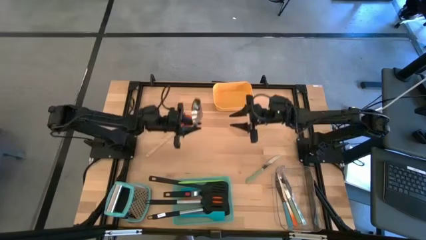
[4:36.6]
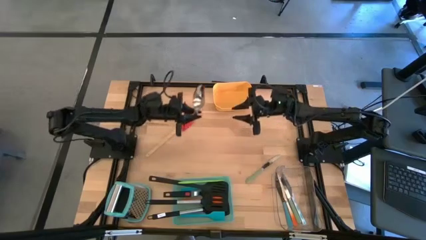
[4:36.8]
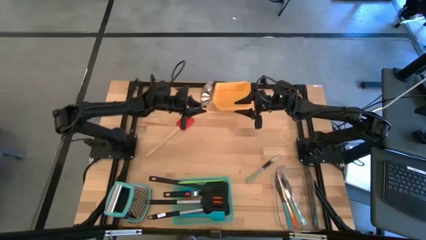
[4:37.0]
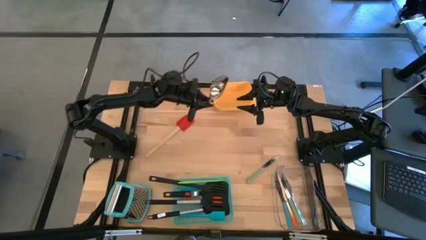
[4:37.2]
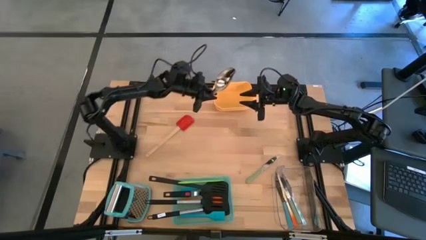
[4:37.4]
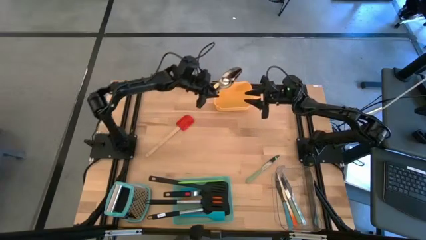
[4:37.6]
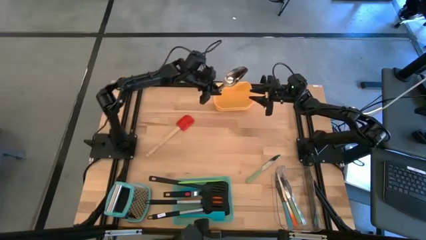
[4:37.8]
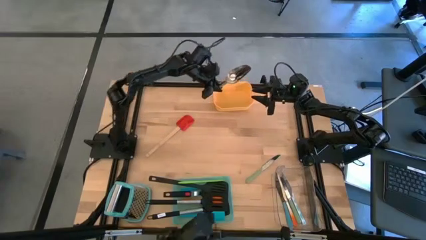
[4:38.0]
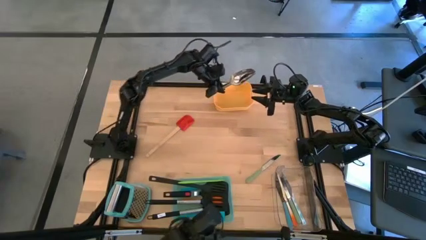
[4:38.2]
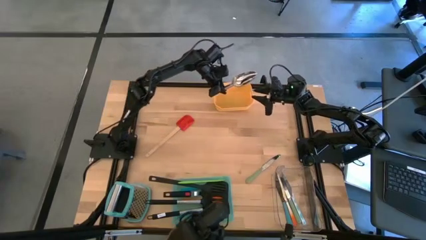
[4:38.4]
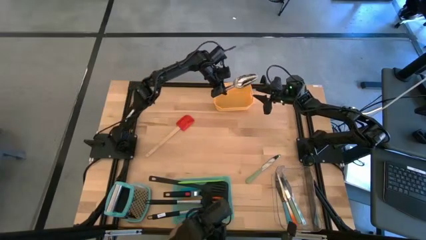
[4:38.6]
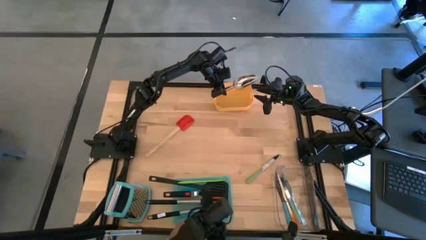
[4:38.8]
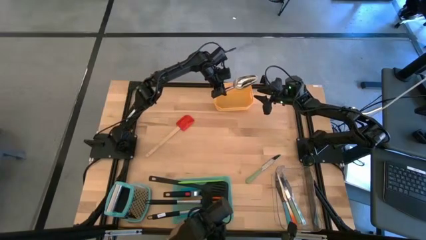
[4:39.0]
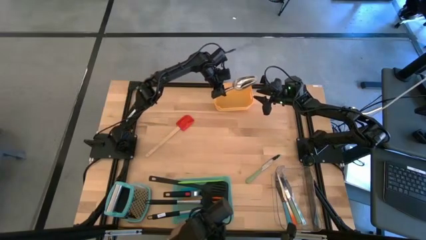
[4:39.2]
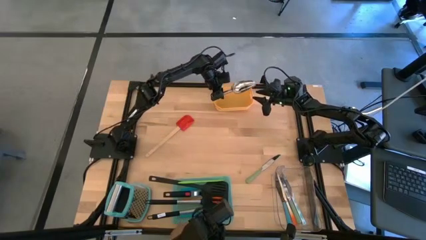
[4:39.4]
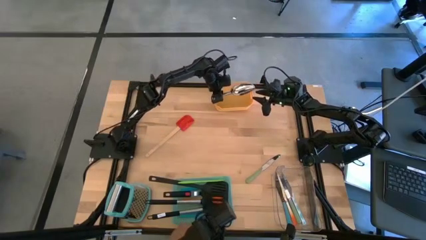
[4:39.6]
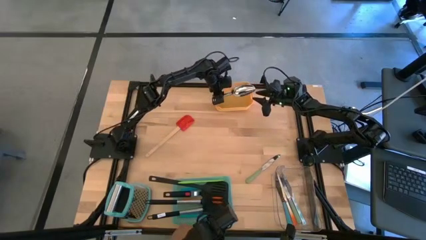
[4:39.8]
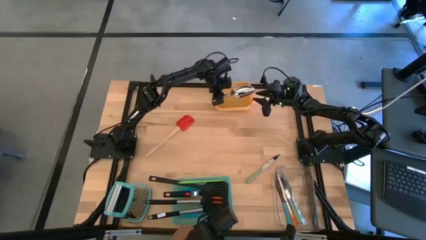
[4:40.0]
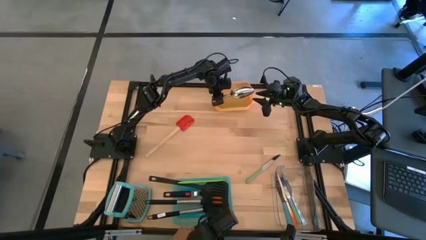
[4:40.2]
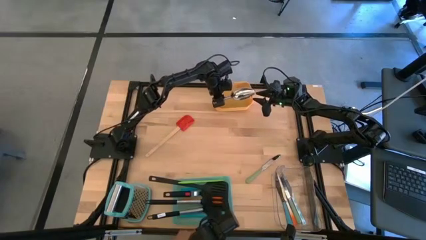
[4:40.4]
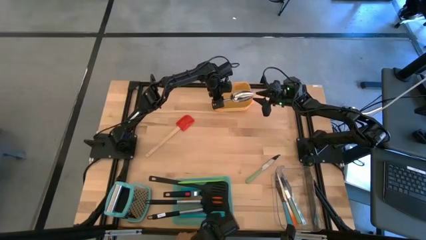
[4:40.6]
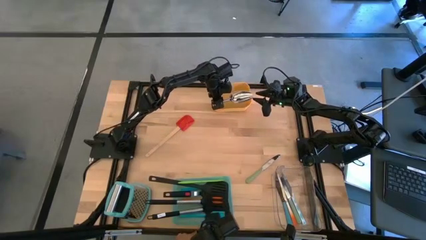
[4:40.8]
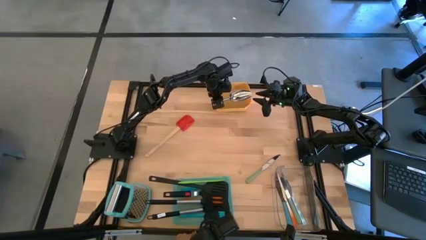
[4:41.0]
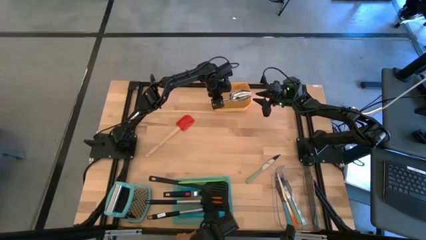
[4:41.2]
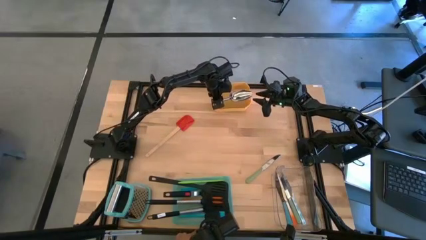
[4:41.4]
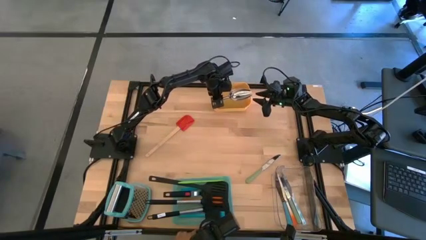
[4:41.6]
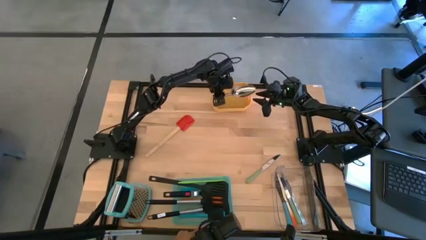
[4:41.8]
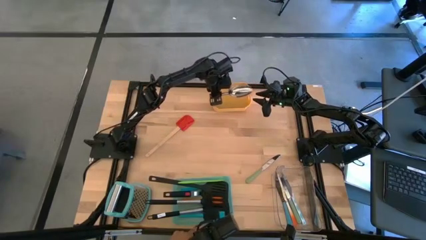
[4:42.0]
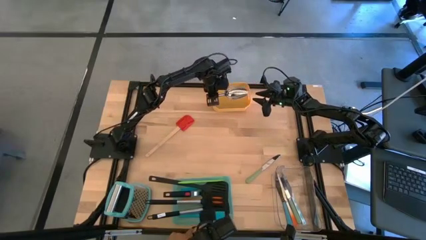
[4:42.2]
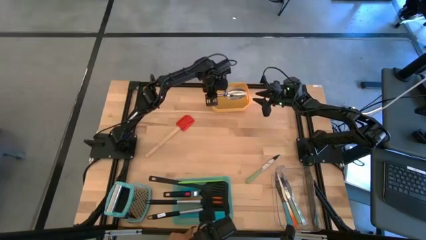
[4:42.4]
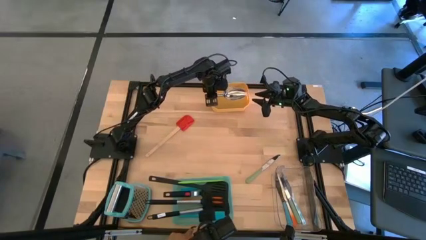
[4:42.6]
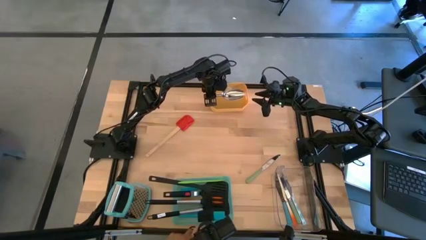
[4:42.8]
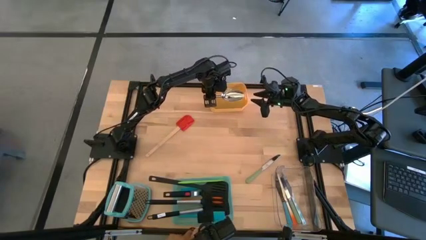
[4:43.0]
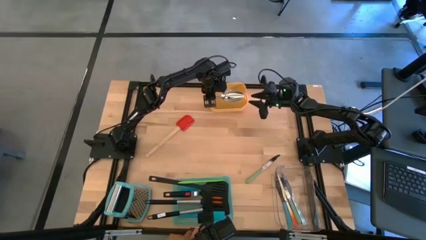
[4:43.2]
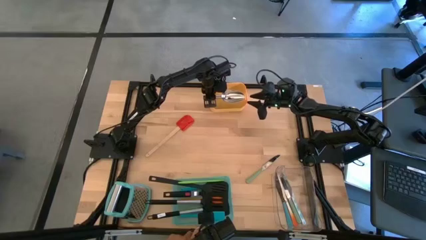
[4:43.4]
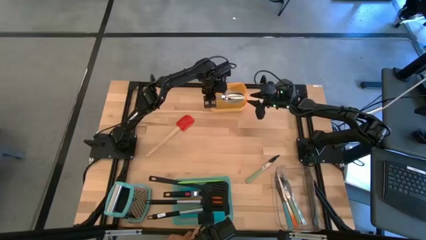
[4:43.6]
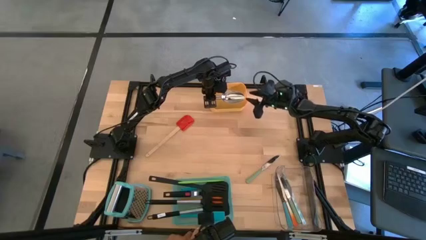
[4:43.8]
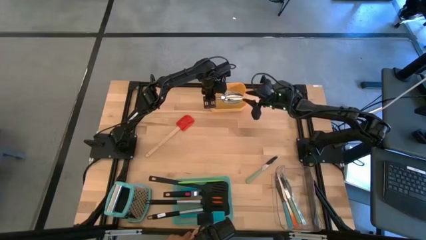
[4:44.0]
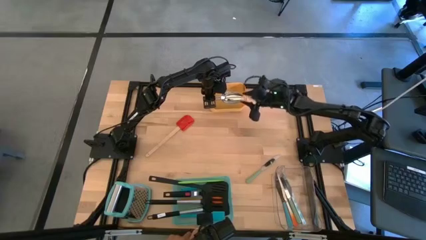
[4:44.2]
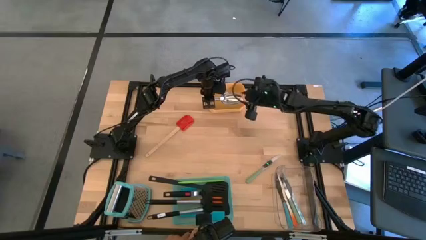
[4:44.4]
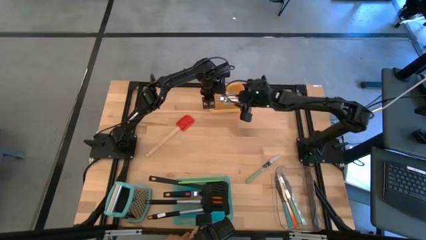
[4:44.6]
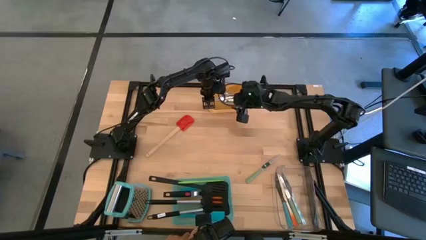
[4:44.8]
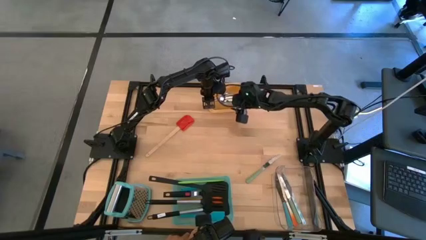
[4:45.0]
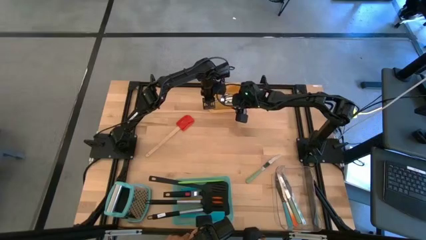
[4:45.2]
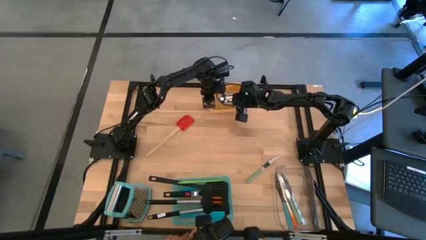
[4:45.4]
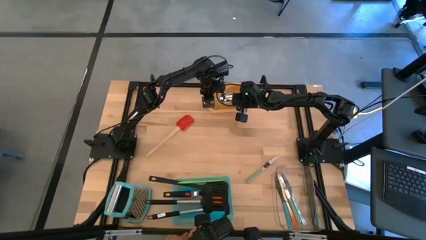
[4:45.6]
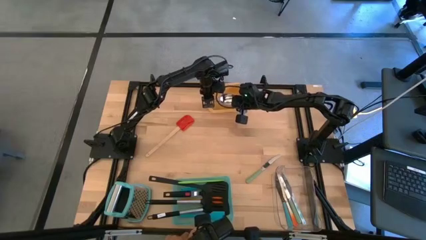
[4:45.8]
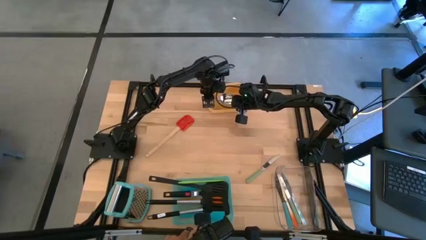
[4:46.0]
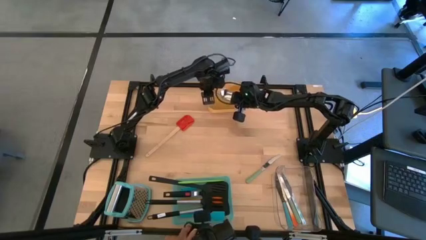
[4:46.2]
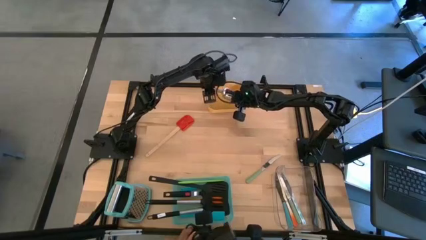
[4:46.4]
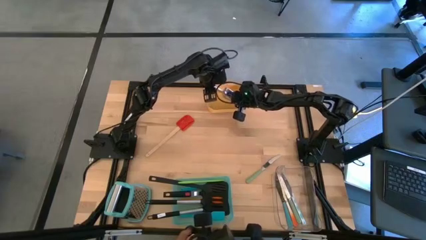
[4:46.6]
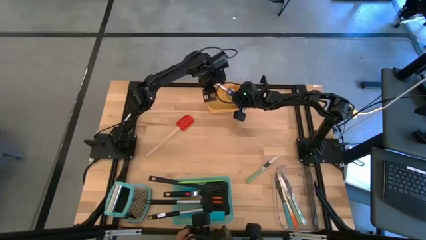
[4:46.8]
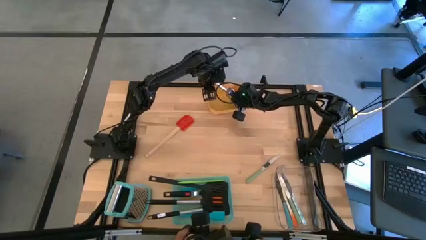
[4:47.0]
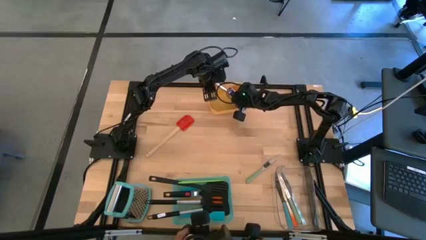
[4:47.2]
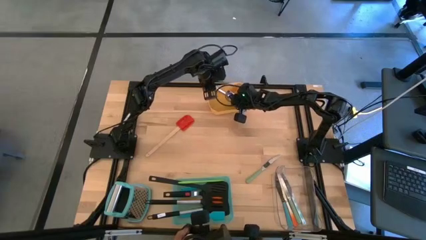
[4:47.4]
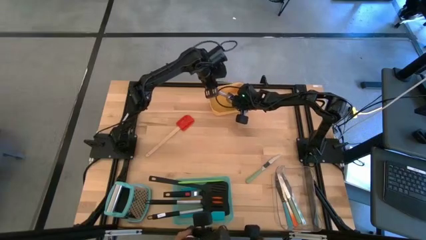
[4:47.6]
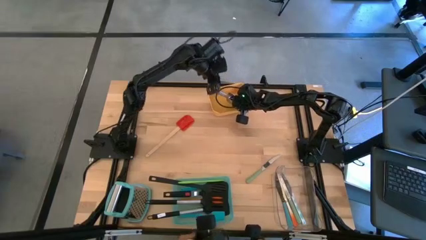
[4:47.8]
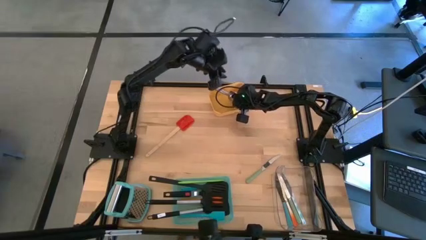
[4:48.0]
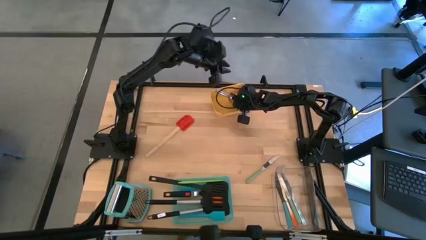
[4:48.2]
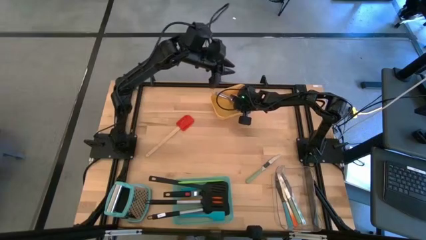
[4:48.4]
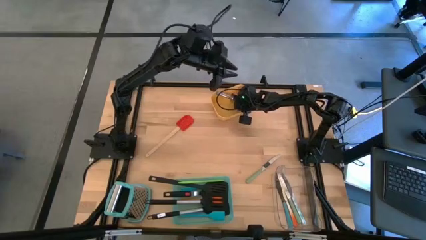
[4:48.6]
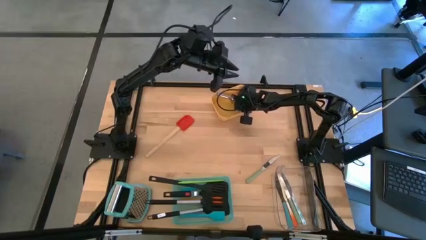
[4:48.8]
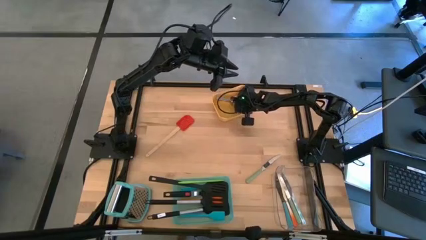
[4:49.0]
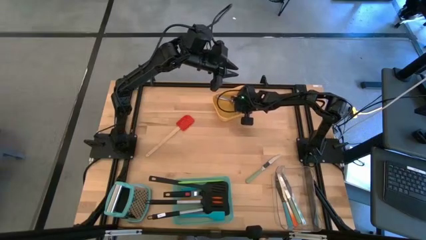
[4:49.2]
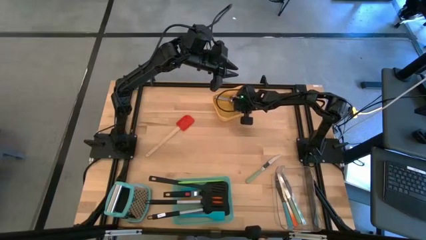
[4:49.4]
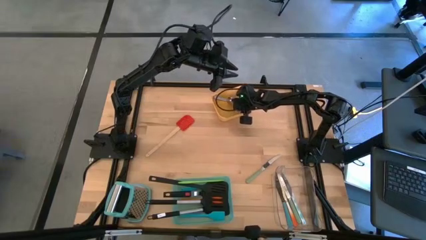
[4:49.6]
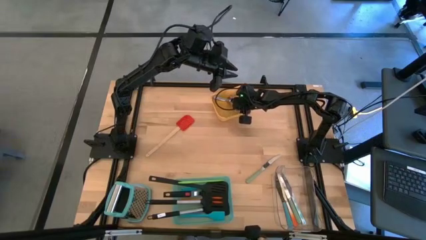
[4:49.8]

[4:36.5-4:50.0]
Task: Pick & Place Kitchen Items
Put the ice scoop into the yellow bin
